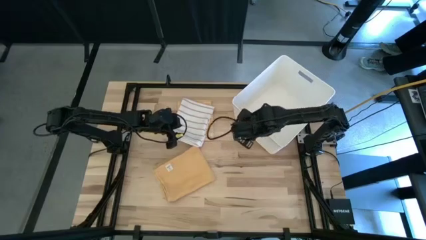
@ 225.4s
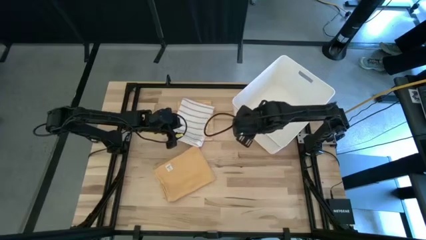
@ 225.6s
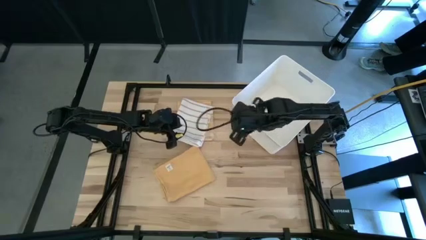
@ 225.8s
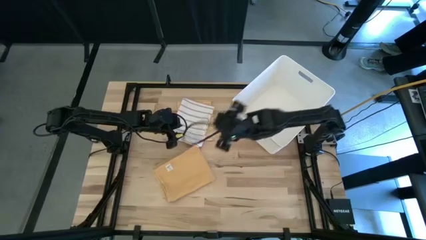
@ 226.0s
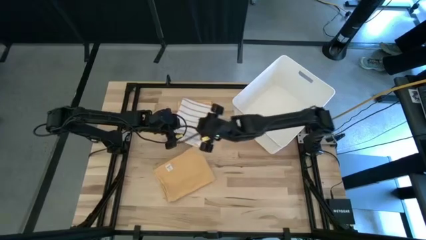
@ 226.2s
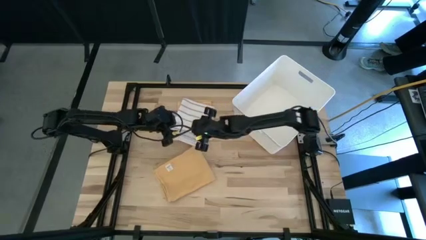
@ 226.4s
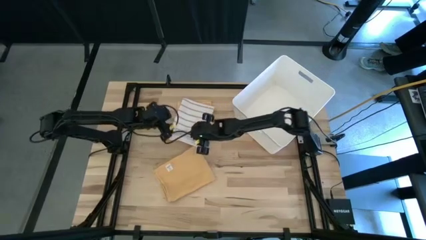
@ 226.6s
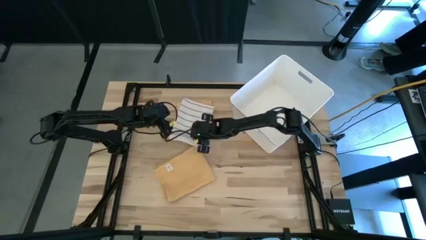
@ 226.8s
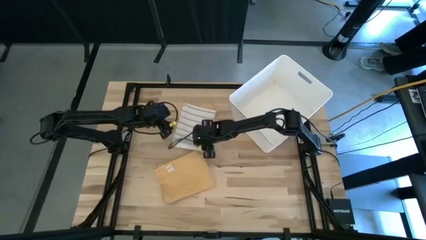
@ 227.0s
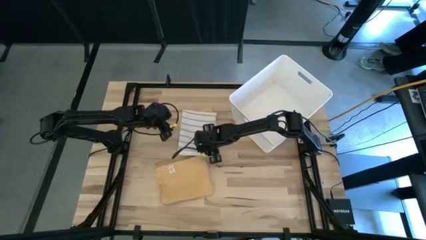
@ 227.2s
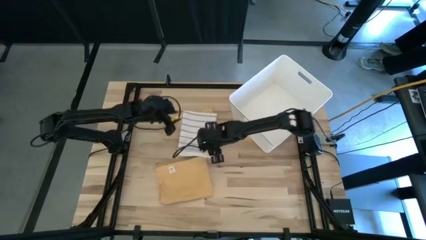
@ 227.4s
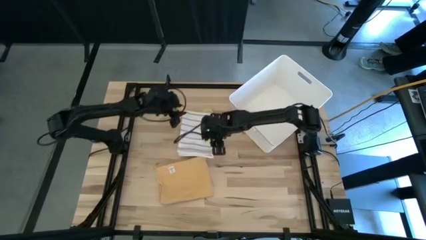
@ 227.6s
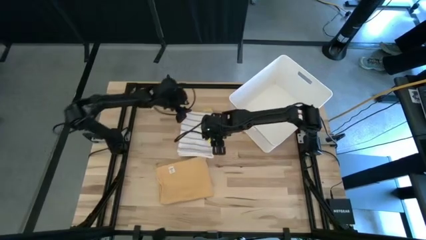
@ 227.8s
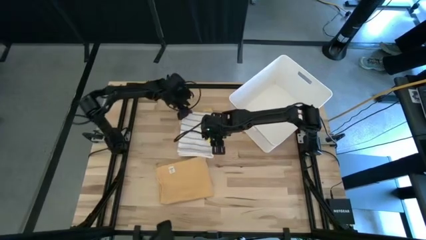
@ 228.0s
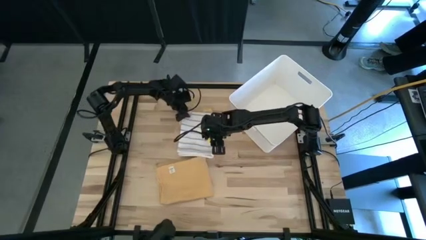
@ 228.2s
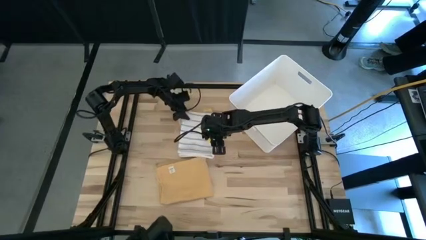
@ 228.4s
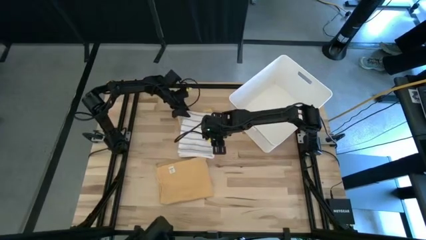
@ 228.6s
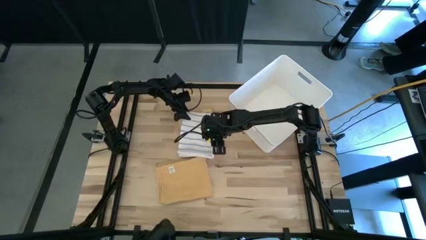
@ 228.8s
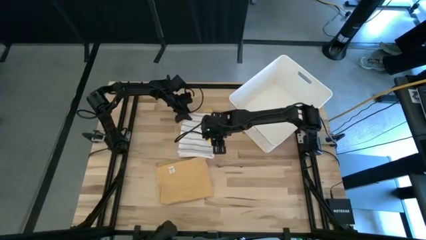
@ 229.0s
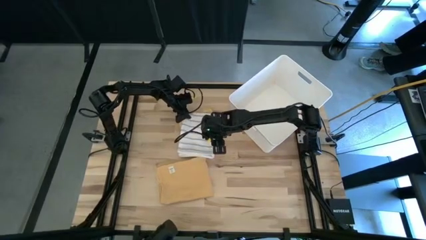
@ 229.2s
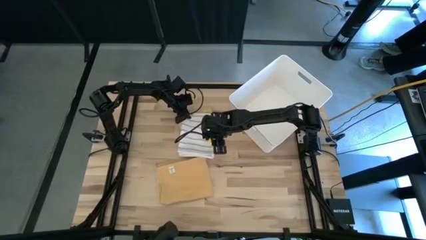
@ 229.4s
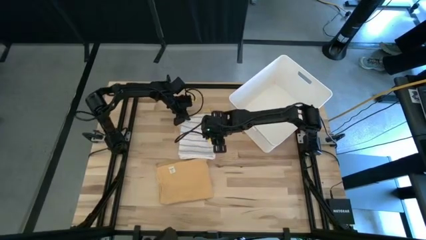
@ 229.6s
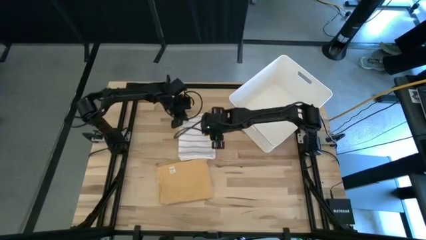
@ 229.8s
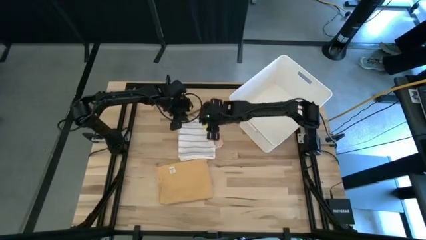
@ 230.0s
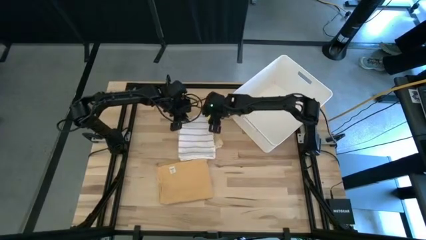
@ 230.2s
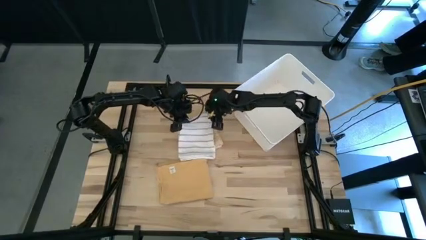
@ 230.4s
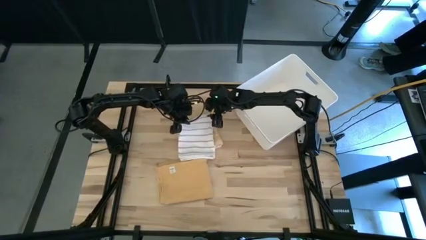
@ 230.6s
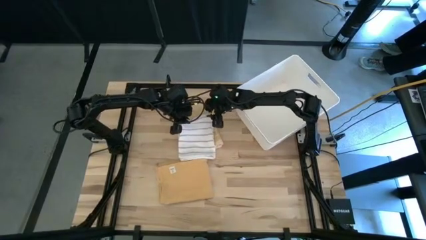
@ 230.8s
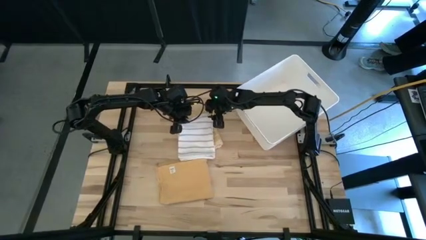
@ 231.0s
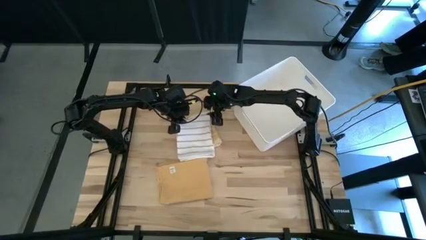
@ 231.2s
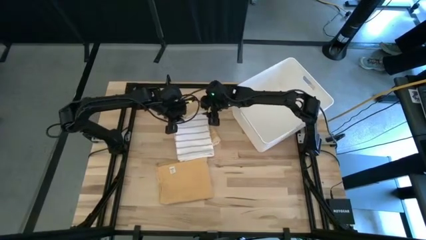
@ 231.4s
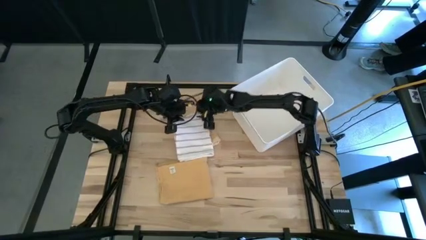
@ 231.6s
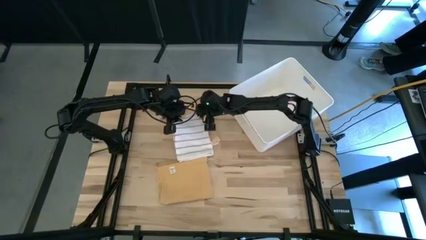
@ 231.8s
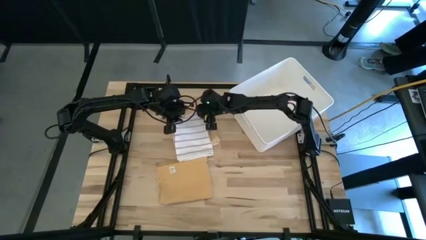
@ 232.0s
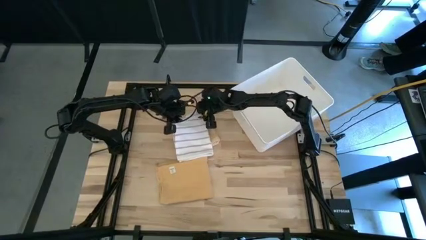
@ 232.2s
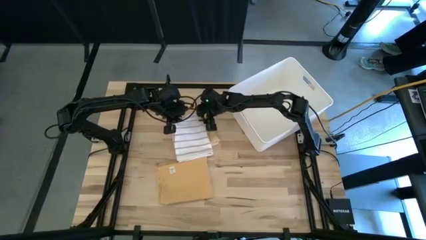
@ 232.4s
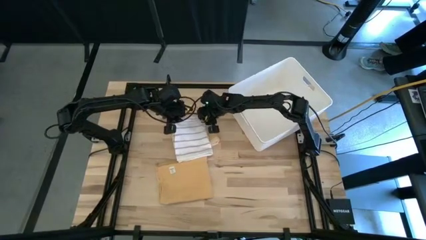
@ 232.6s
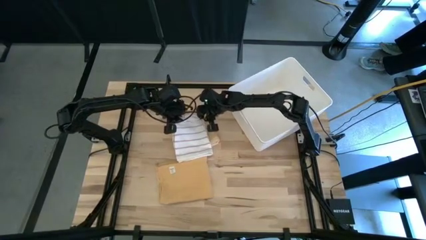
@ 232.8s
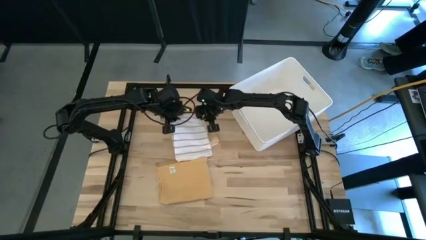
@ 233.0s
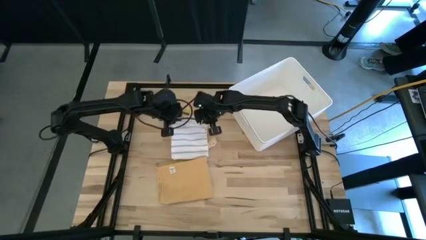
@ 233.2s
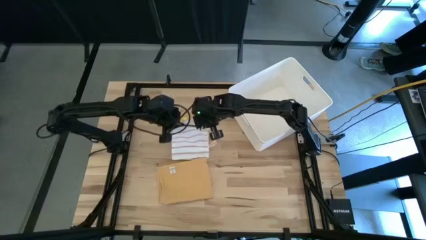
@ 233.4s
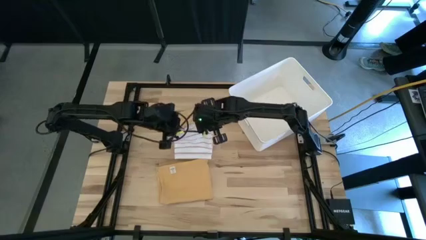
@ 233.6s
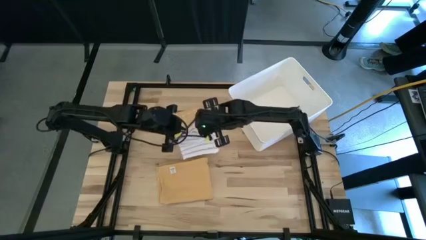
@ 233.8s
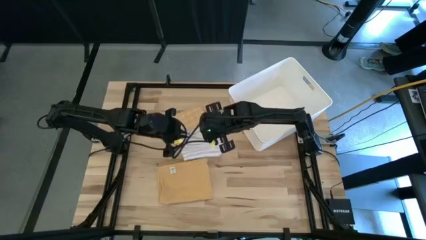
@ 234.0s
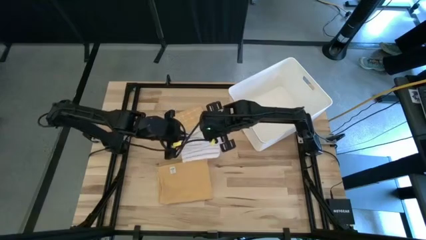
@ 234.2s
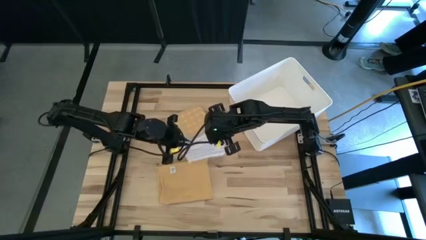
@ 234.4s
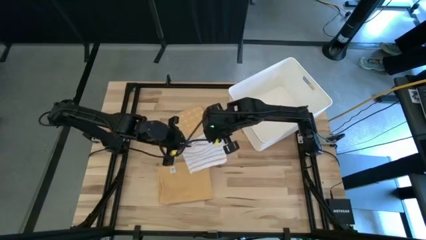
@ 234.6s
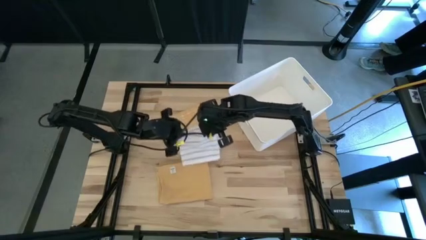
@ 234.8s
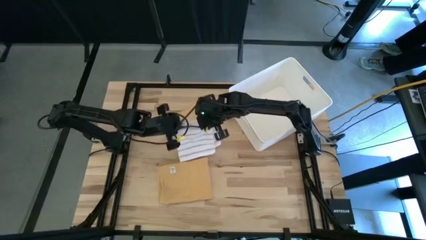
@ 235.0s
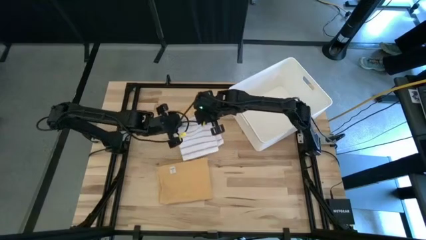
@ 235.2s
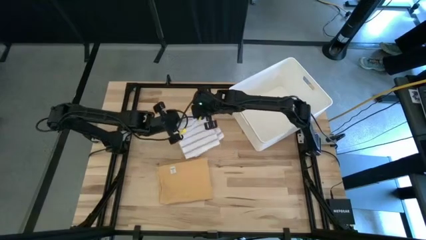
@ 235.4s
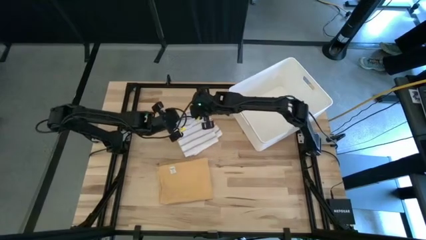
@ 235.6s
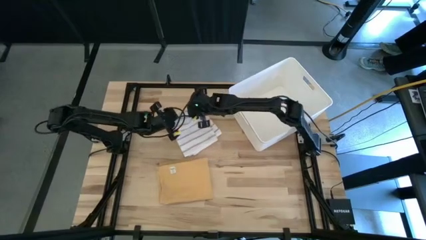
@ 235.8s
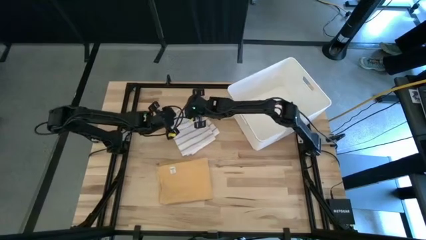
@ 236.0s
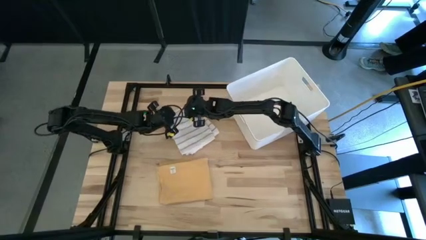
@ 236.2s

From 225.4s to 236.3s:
Task: Fold towel
Adjust the white towel

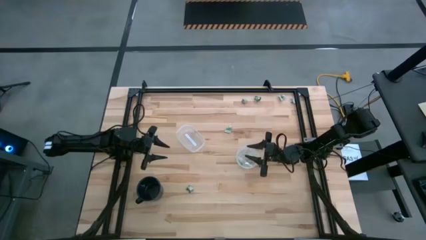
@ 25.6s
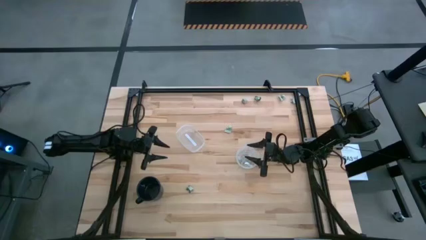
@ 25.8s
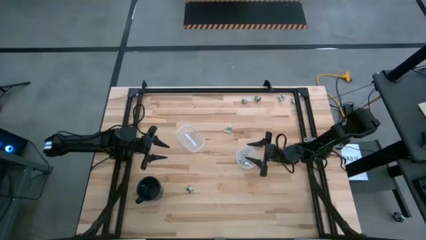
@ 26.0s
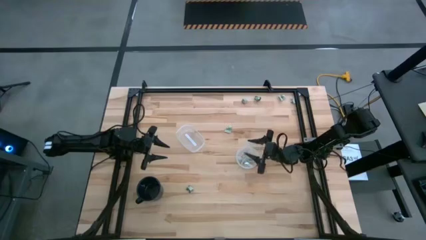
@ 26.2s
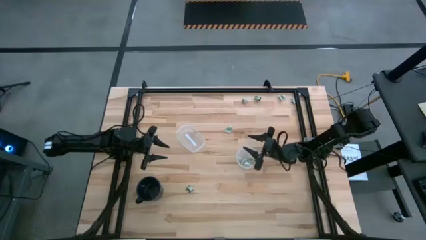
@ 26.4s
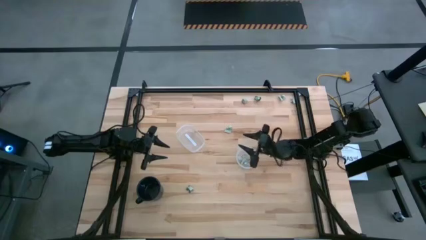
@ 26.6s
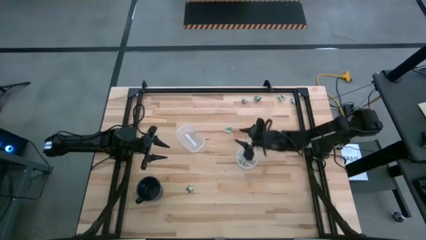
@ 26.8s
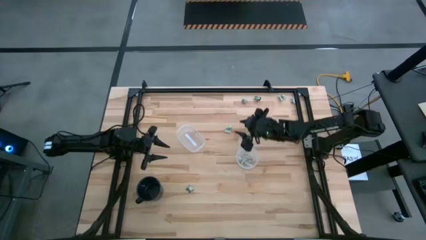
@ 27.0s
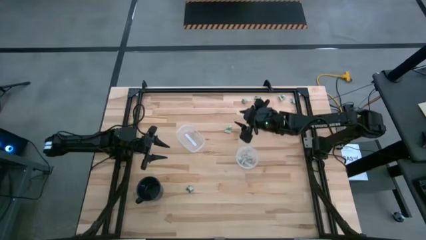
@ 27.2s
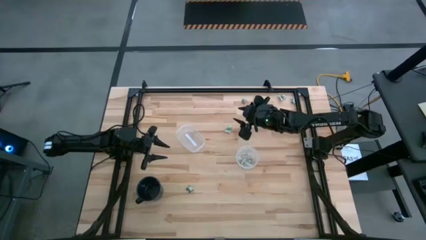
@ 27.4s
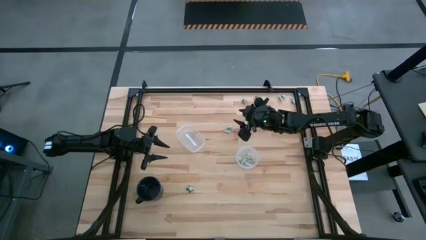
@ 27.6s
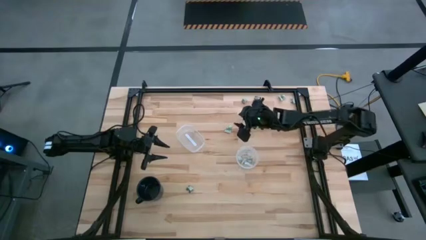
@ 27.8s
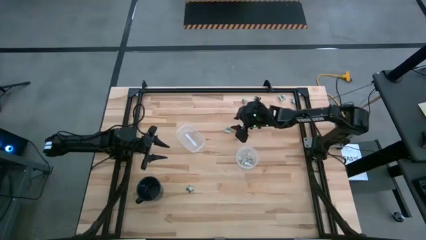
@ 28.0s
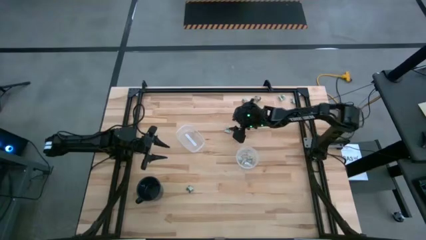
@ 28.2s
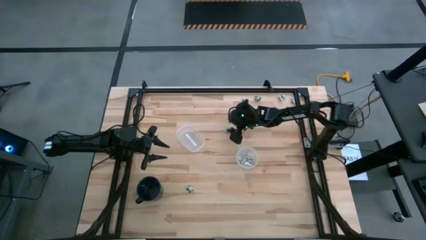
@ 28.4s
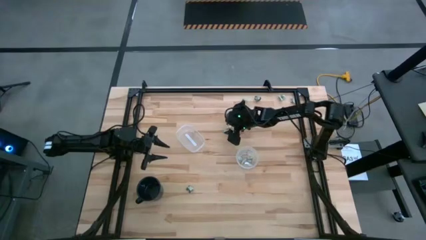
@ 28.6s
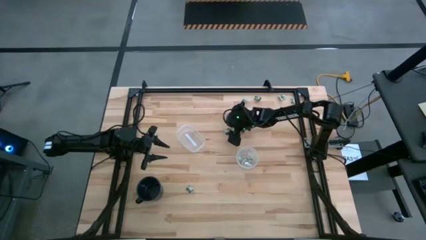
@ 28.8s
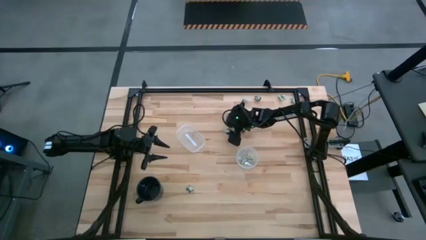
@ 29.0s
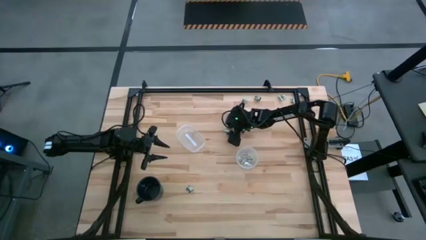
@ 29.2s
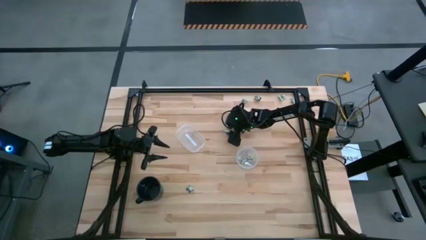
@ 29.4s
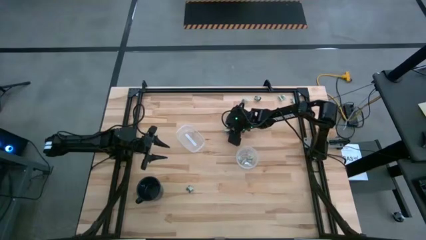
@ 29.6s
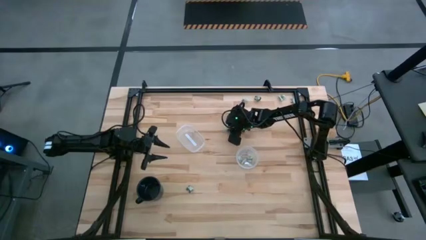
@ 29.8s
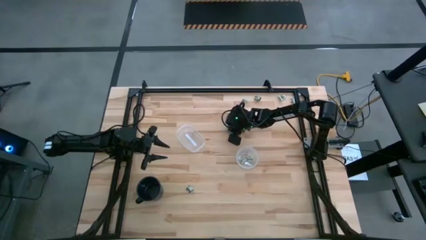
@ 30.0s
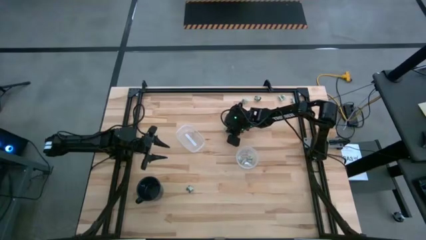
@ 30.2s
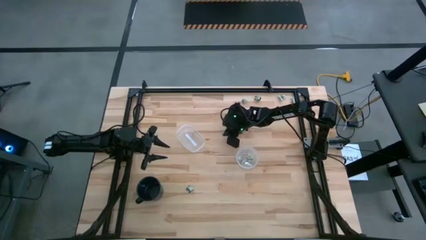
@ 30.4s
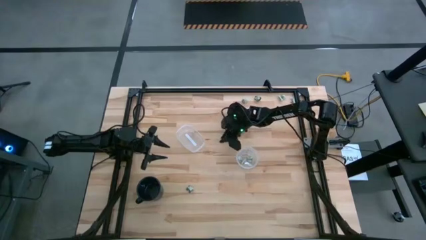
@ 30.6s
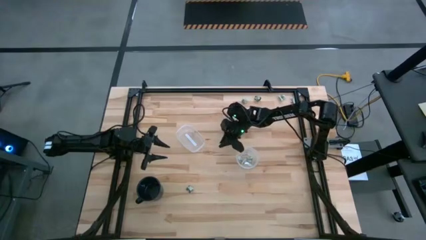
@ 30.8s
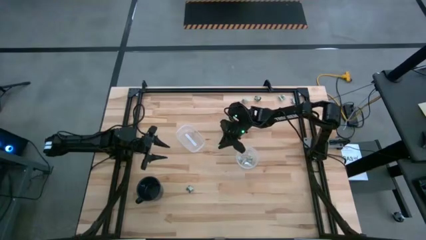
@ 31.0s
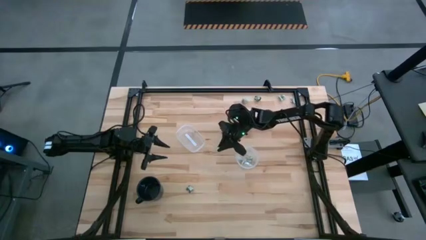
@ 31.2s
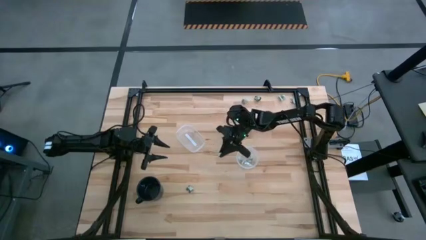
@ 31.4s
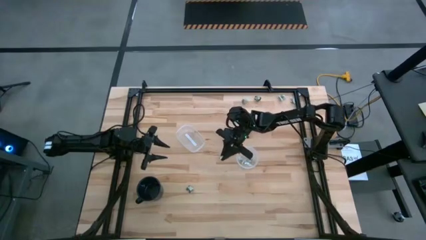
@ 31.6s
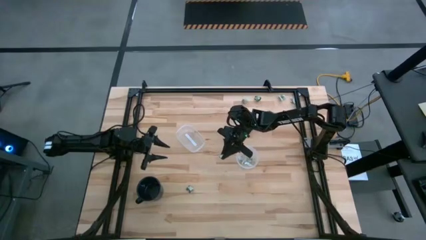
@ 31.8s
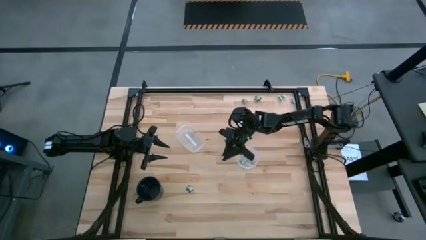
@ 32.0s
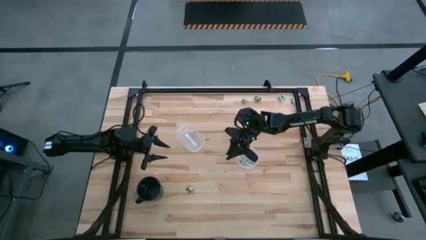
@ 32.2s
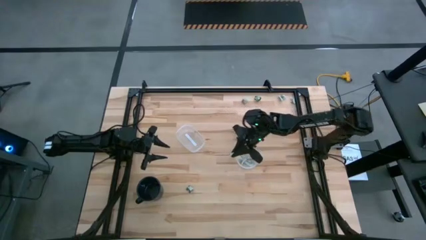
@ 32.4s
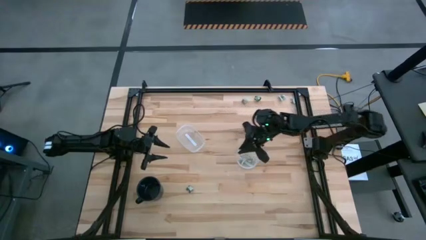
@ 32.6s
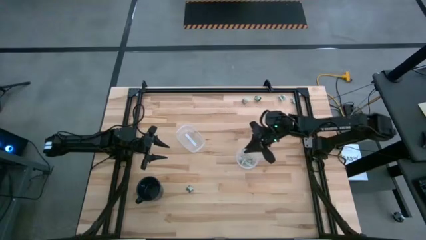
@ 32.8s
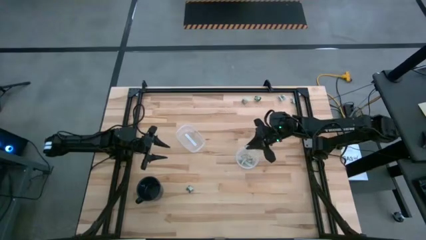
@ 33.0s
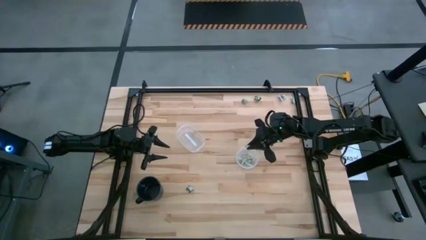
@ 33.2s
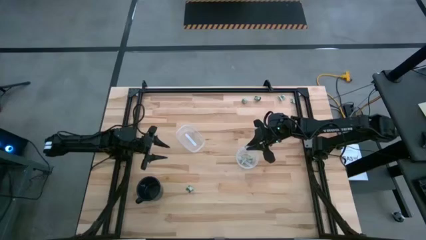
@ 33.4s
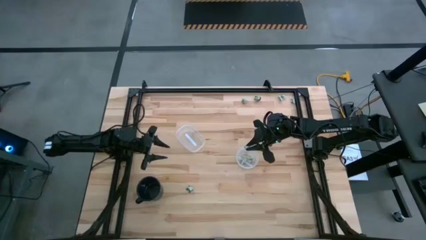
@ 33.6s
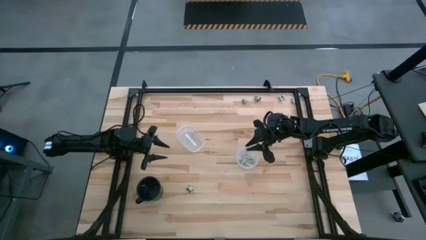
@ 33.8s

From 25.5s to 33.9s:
Task: Pick and place Stevia / Truvia into bins
Put the white stevia packet into the right transparent container
